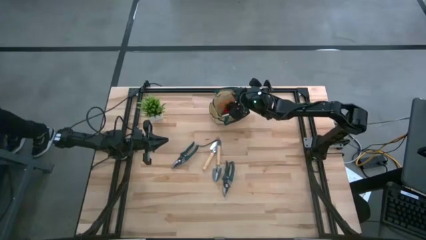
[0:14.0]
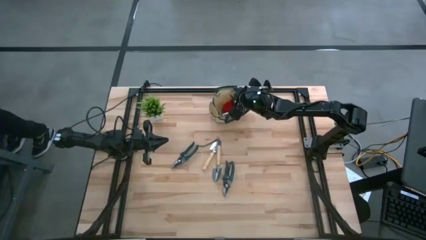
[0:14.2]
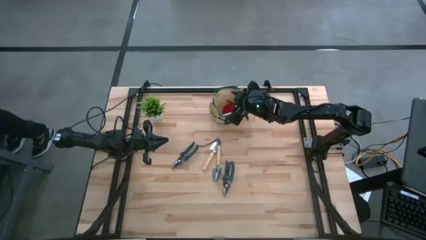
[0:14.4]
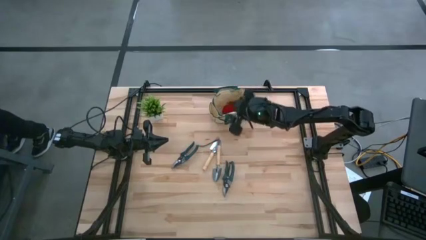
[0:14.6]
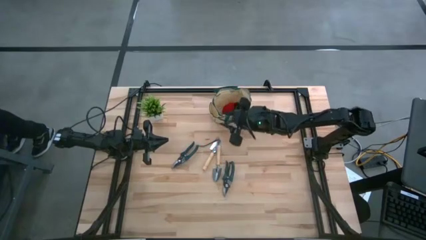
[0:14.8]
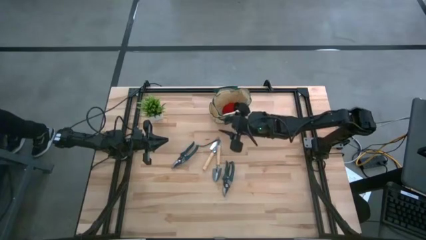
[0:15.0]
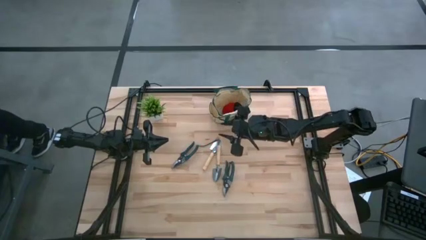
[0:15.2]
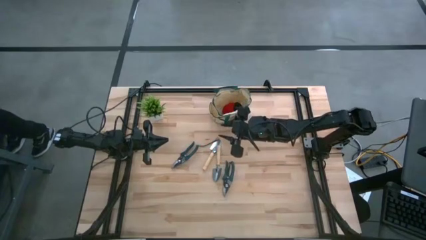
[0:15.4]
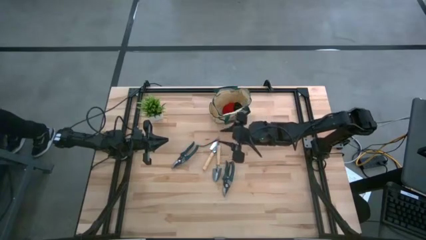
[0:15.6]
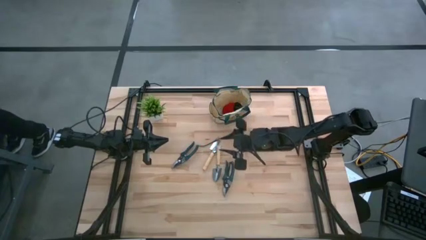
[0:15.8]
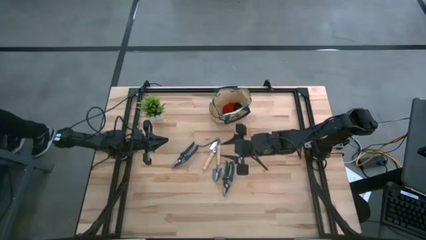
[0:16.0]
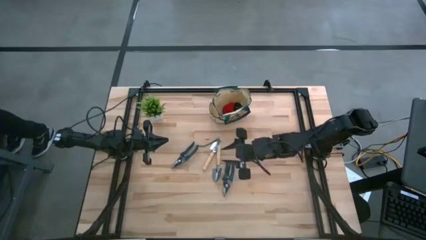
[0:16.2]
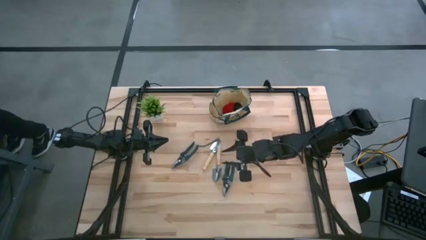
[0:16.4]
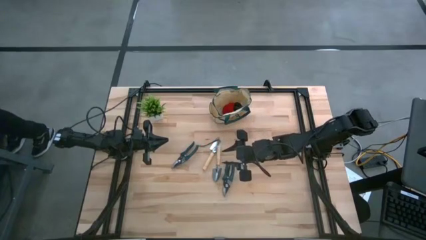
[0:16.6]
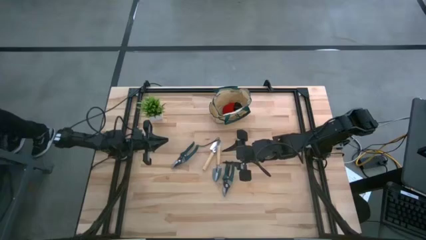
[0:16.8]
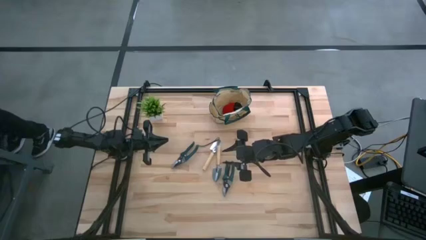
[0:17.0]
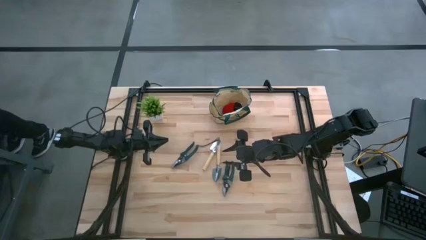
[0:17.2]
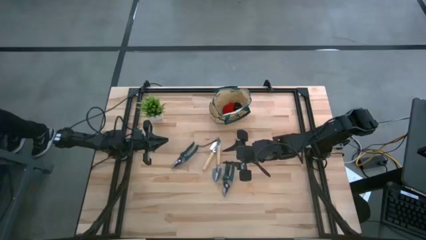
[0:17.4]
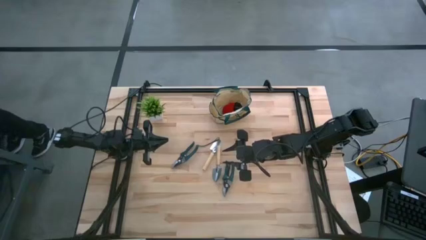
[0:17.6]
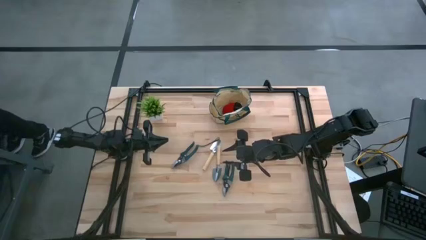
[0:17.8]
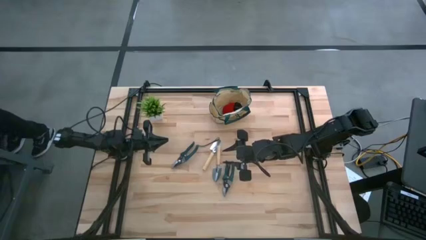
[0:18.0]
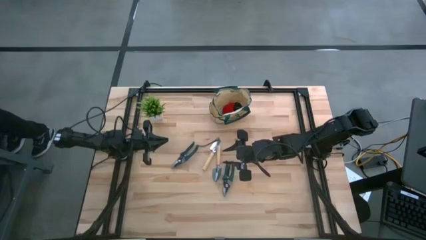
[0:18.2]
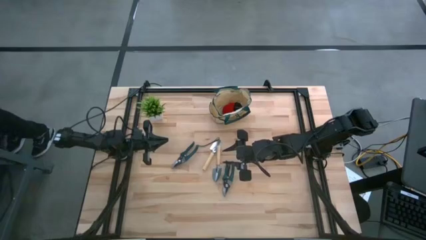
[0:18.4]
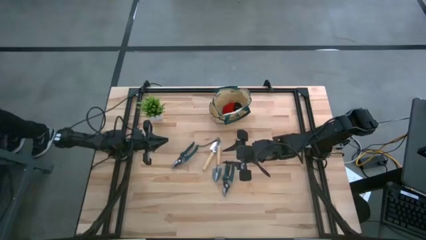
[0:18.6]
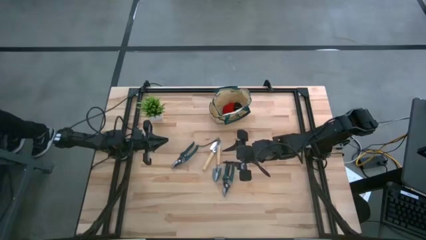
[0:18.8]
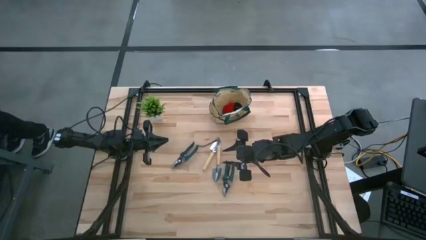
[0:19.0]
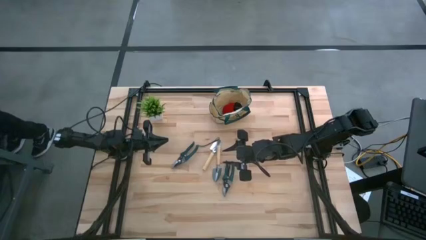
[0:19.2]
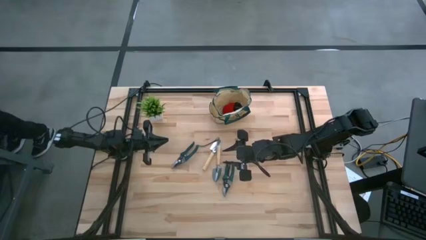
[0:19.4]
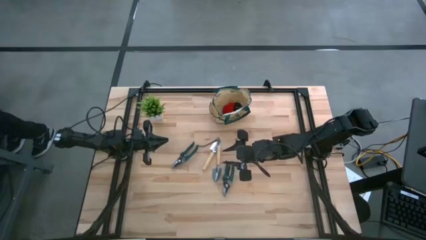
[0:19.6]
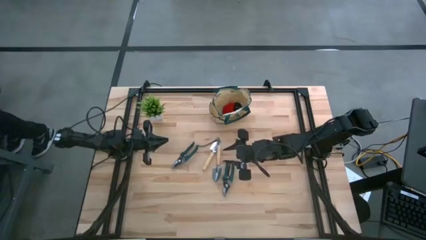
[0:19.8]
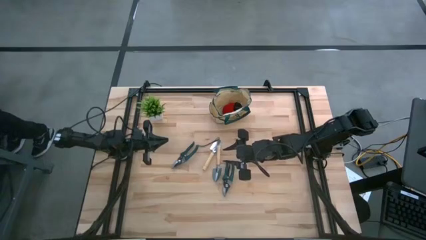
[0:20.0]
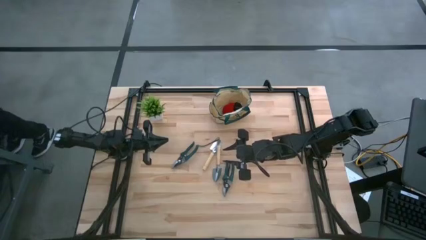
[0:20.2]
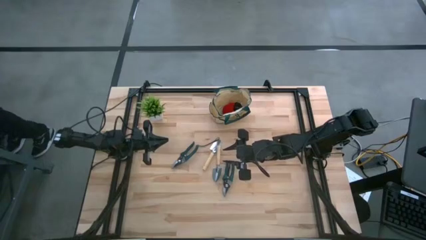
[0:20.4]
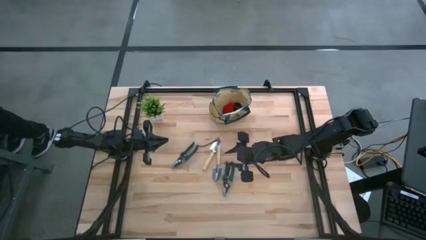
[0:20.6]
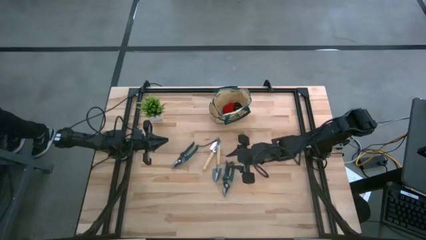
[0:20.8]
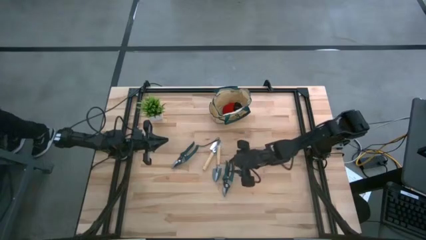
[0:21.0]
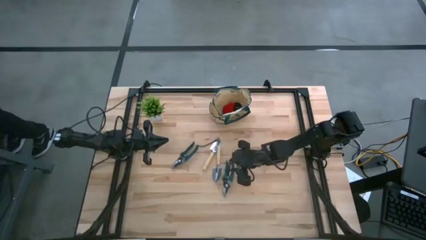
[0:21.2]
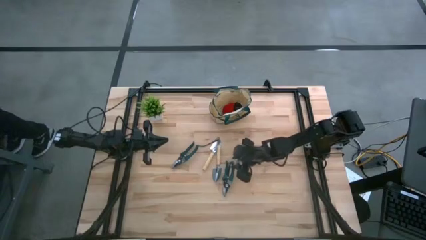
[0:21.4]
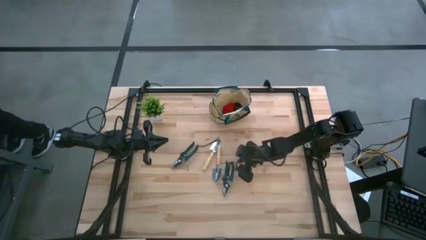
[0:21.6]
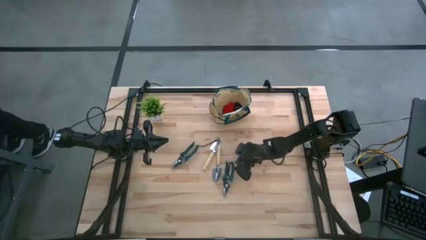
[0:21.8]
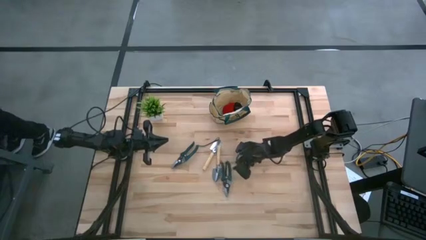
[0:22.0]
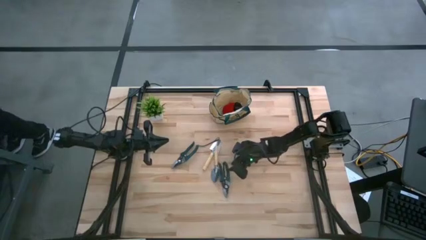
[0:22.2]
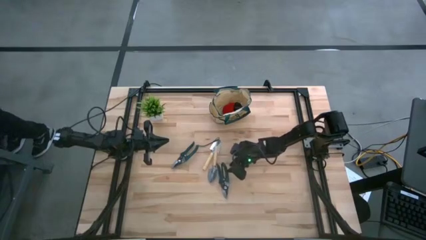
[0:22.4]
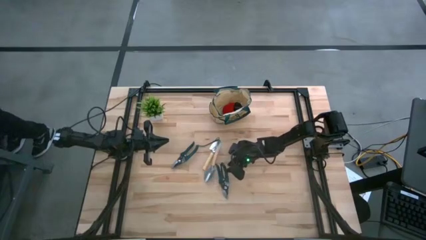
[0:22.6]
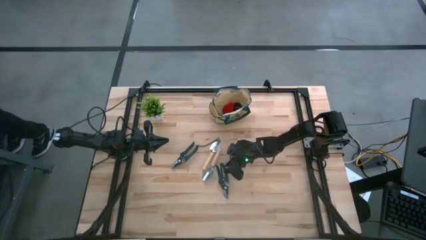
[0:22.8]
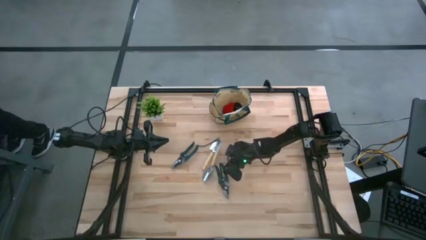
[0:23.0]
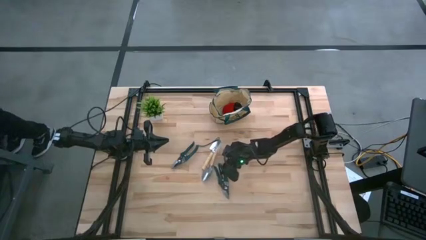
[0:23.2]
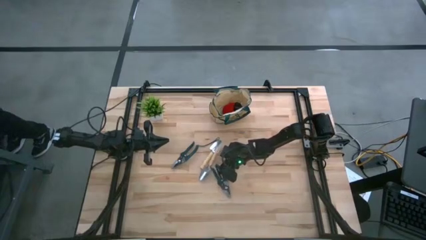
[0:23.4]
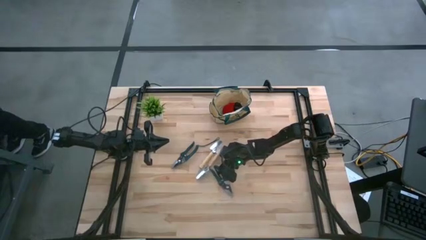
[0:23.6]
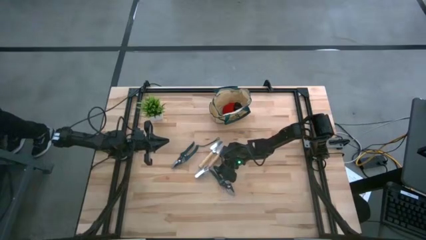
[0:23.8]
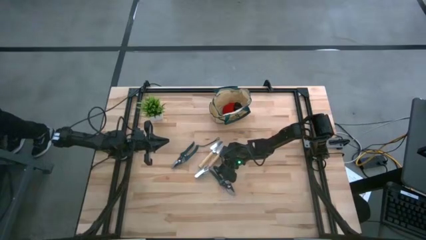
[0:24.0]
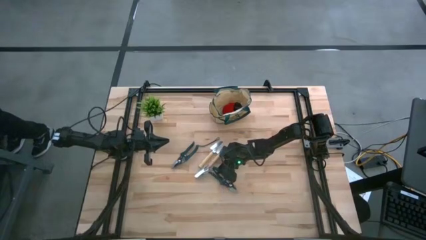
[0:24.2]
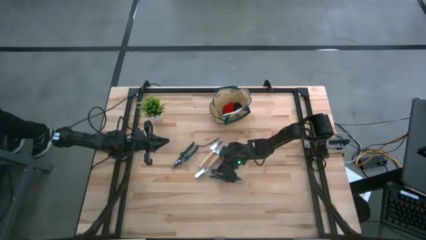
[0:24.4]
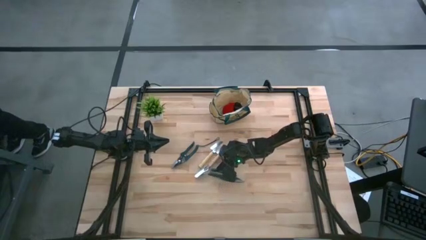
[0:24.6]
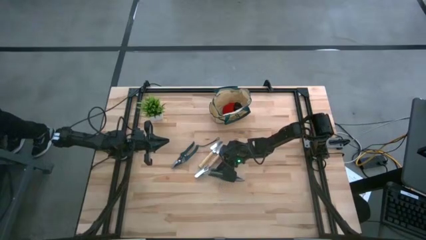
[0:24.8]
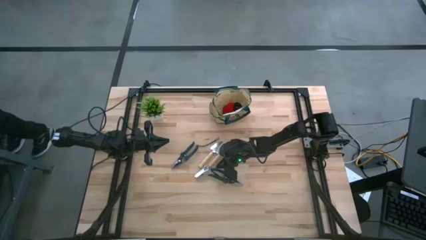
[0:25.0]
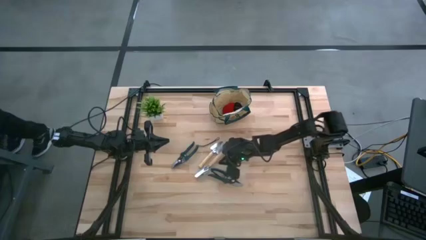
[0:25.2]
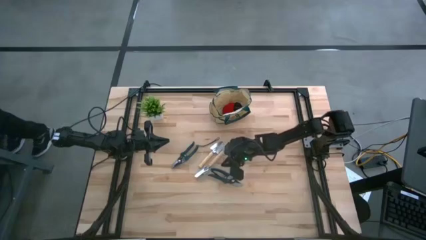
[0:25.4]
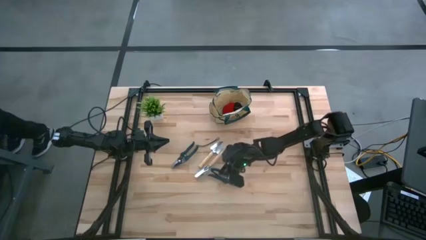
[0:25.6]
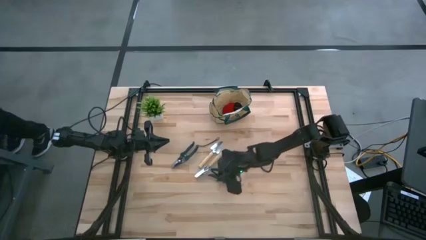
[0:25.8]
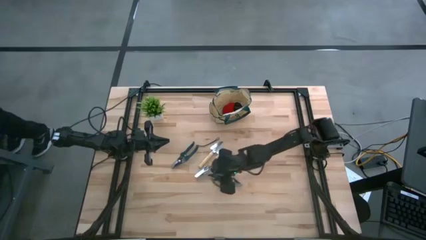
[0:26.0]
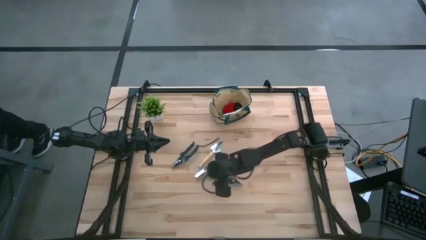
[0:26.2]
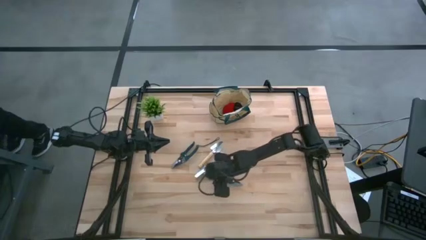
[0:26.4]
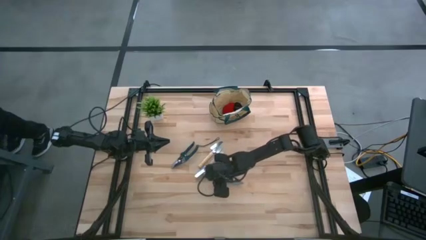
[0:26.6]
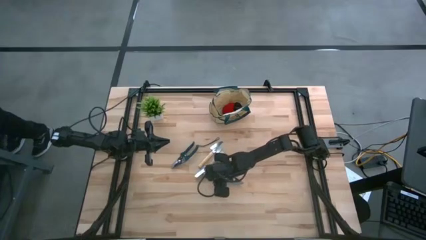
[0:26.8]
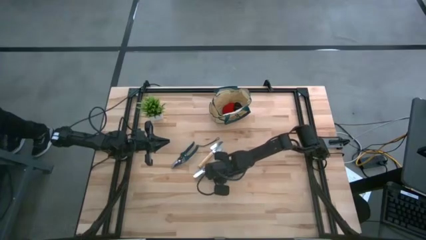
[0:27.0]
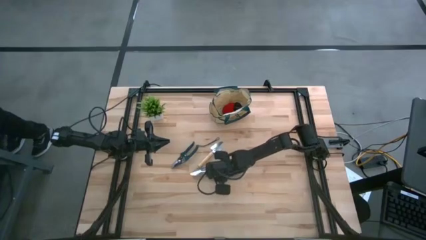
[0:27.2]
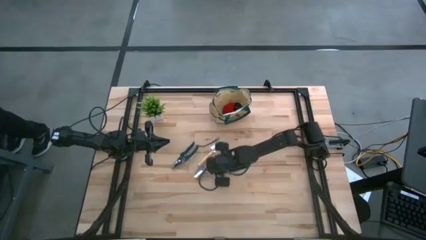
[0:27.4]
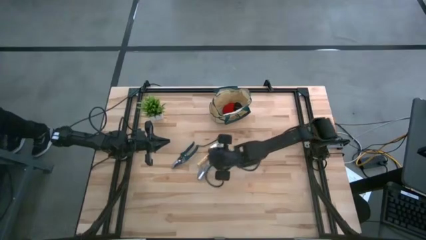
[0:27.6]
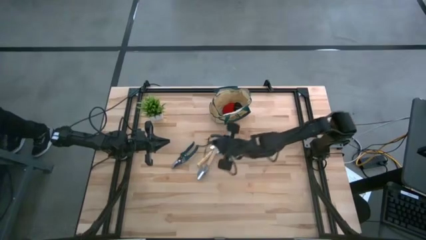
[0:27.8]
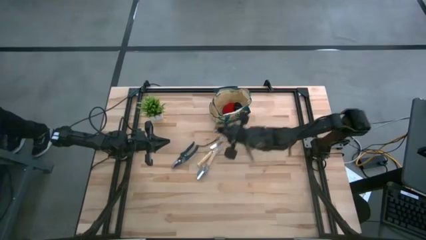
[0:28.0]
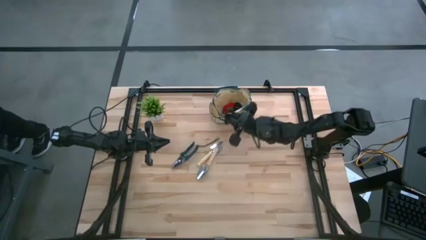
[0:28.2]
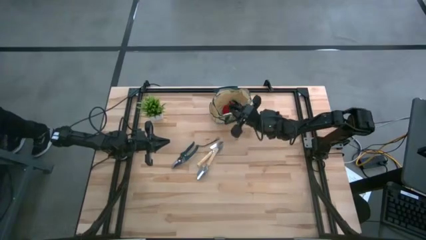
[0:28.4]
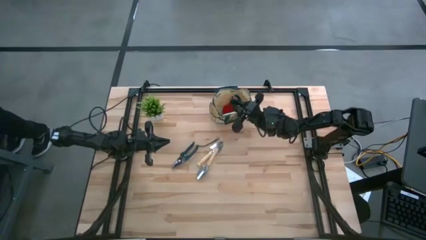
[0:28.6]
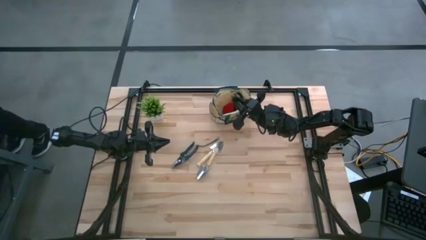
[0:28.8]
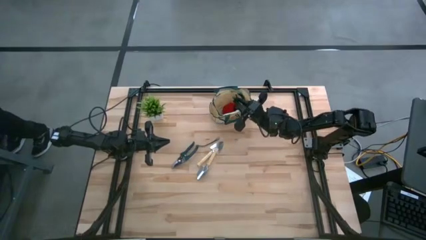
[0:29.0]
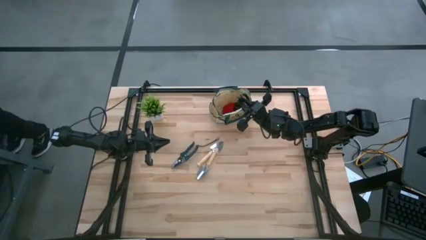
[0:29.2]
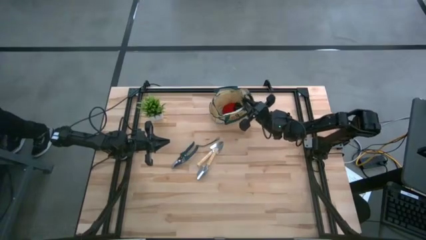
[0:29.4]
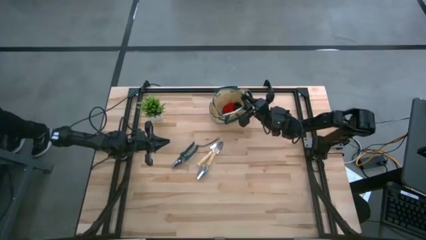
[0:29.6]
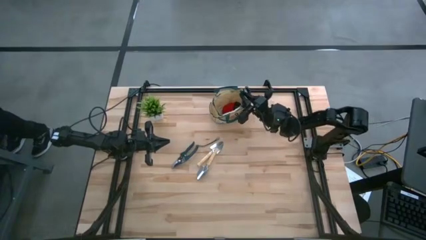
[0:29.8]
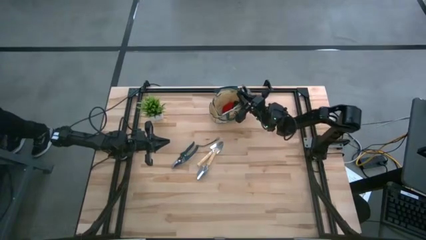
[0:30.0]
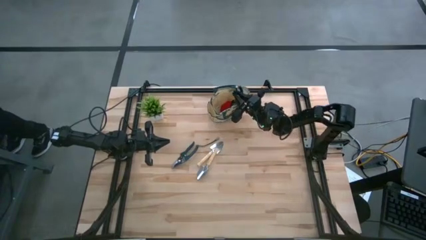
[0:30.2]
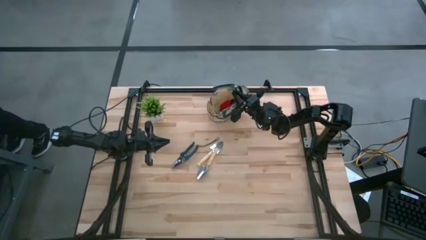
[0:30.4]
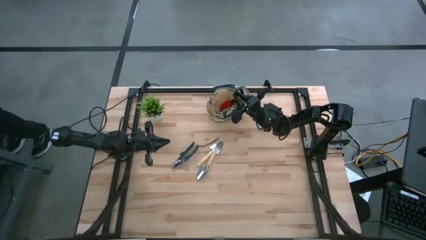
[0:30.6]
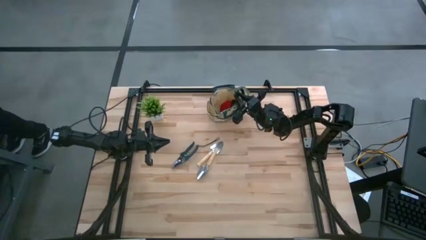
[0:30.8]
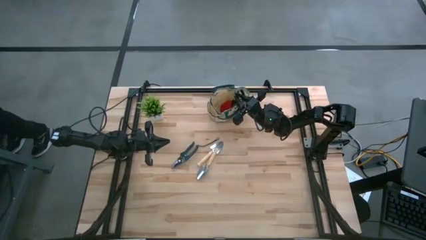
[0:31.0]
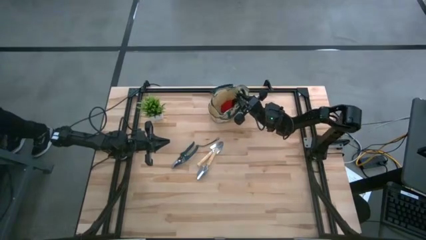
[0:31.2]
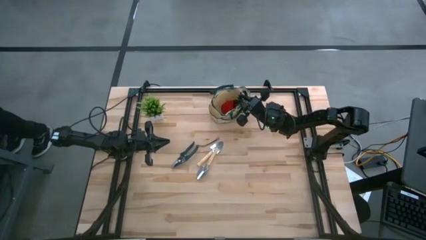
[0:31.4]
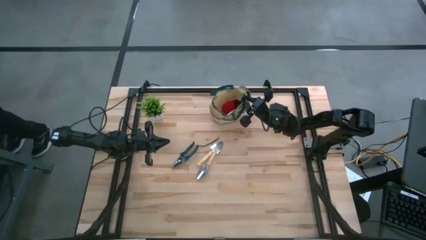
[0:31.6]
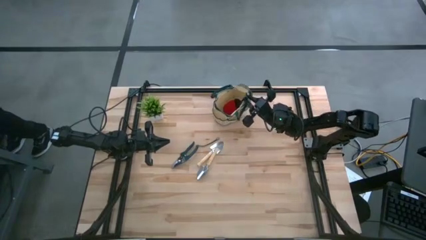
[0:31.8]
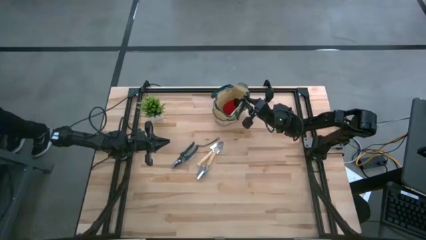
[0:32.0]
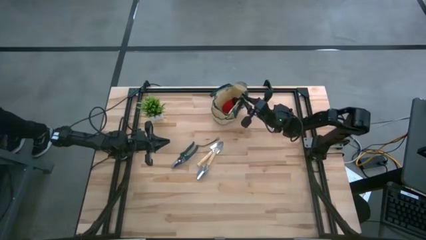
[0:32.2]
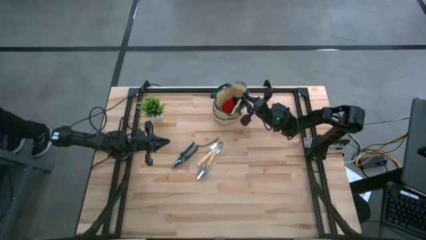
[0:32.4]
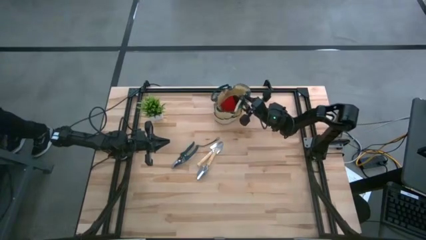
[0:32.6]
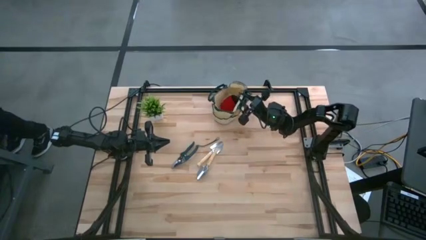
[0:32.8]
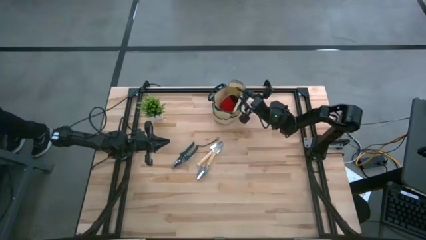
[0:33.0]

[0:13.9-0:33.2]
Task: Pick & Place Garden tools in Gardening bag
Put the right green scissors into the green bag
